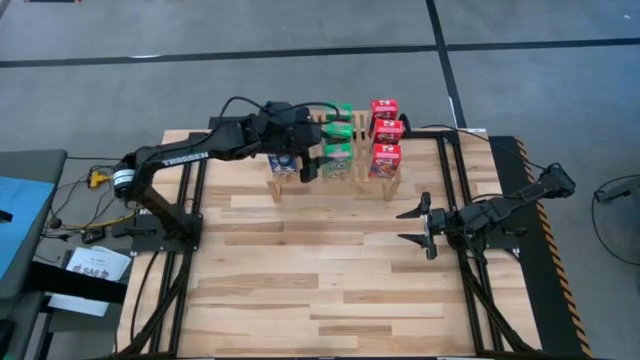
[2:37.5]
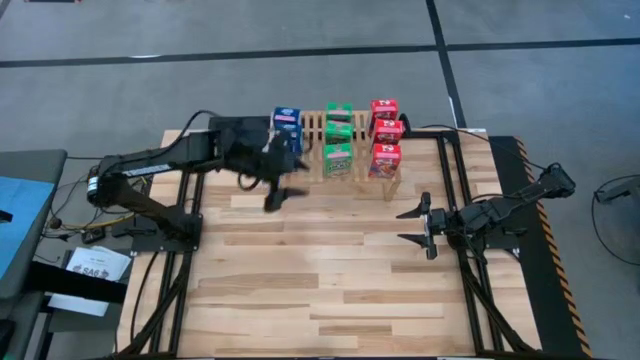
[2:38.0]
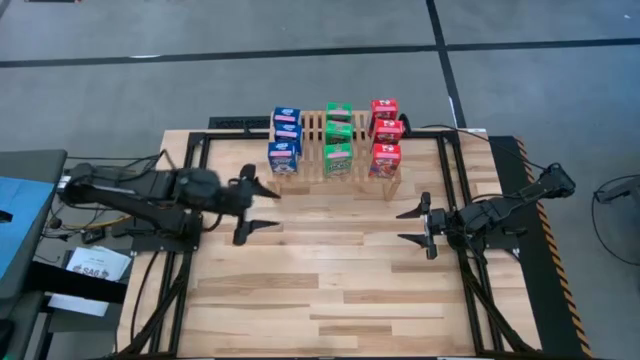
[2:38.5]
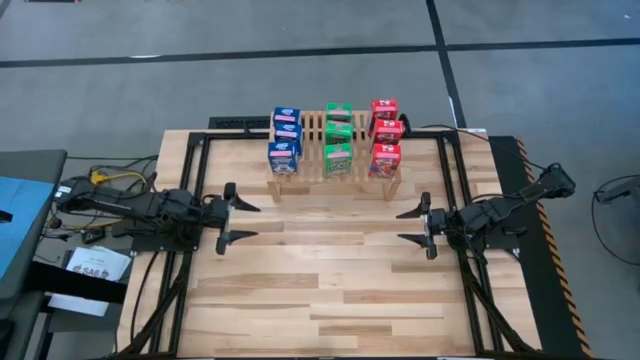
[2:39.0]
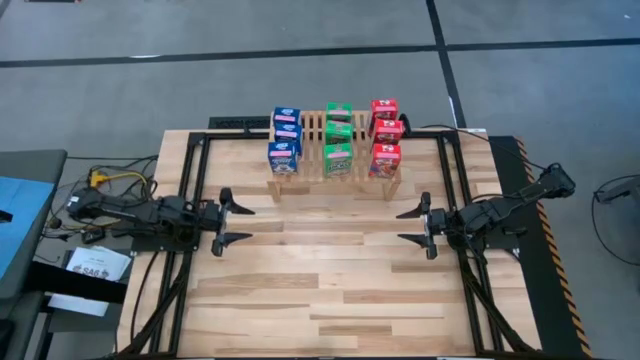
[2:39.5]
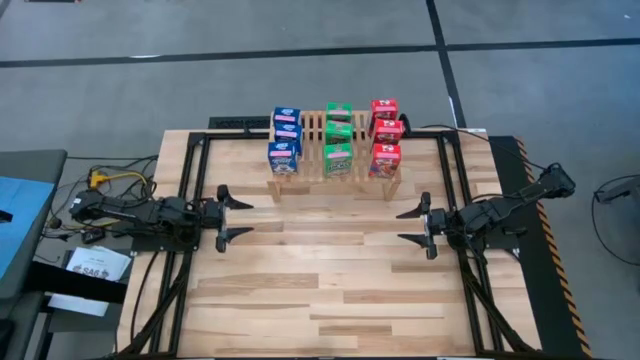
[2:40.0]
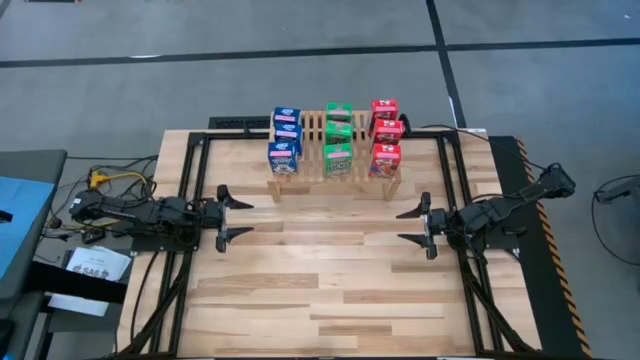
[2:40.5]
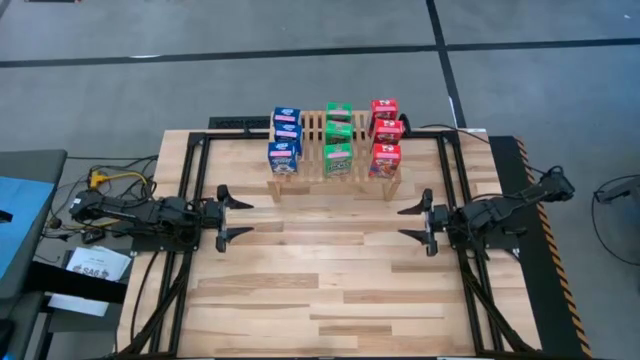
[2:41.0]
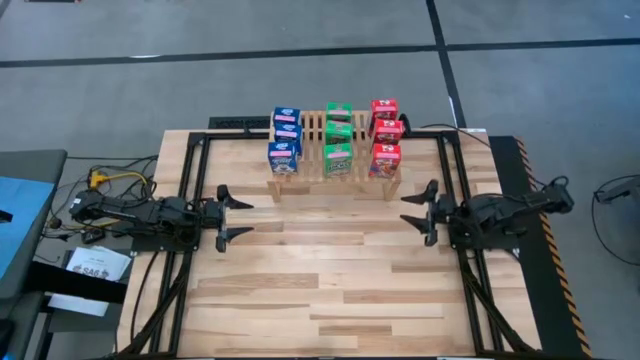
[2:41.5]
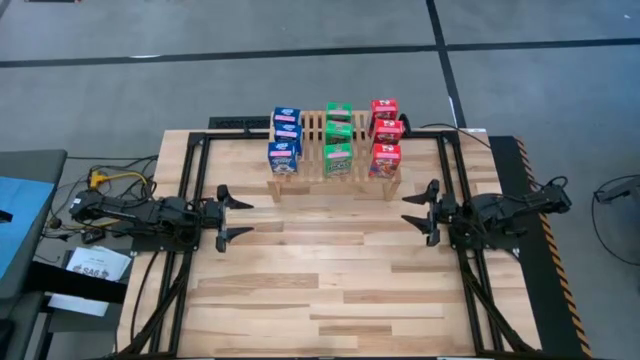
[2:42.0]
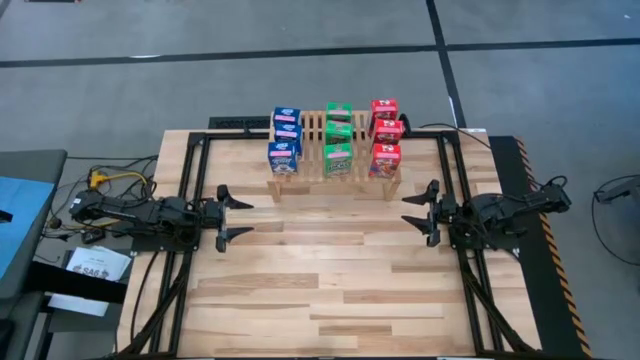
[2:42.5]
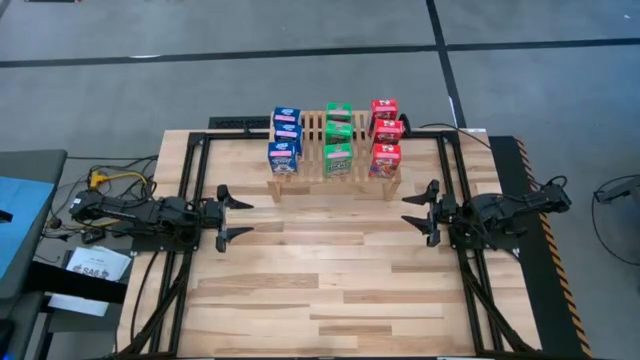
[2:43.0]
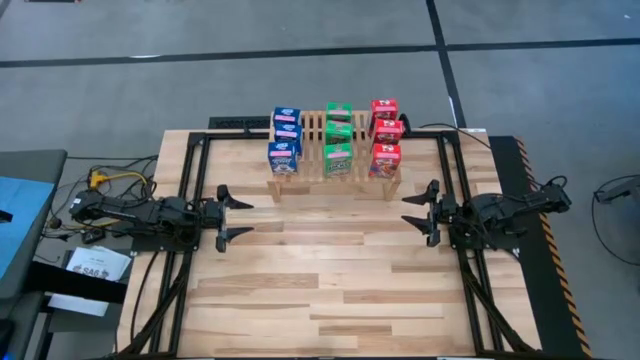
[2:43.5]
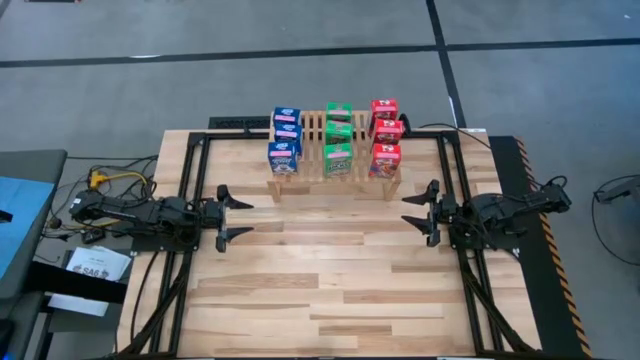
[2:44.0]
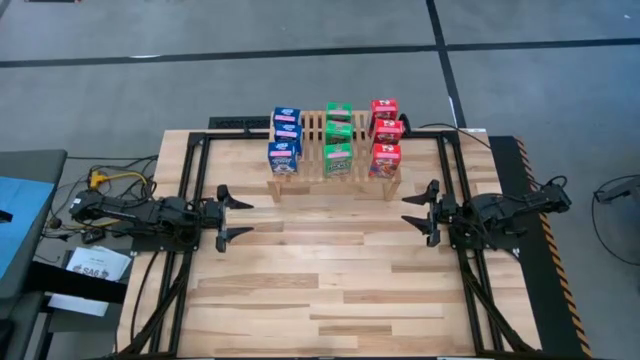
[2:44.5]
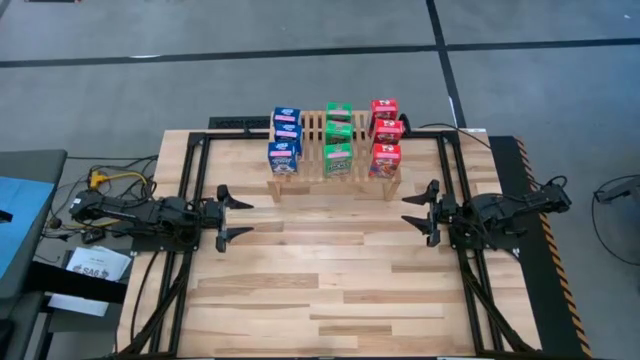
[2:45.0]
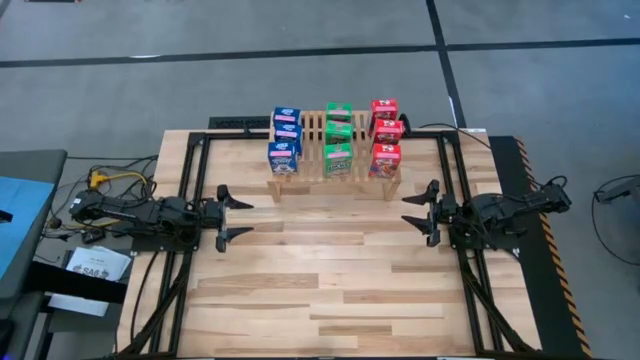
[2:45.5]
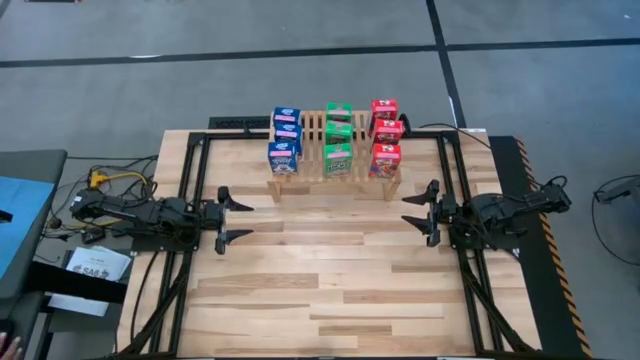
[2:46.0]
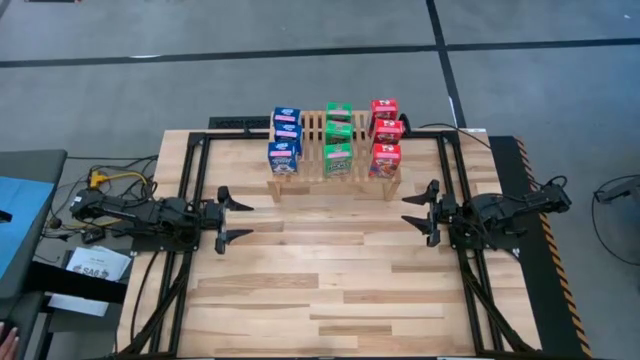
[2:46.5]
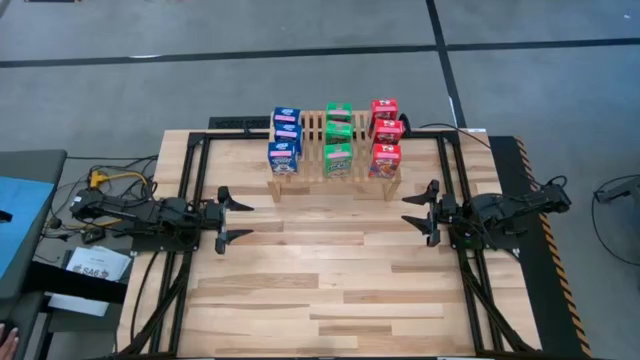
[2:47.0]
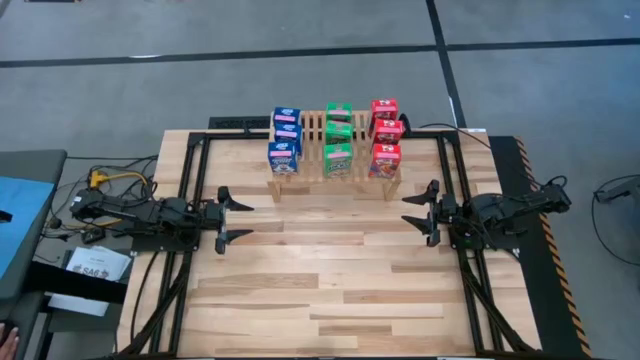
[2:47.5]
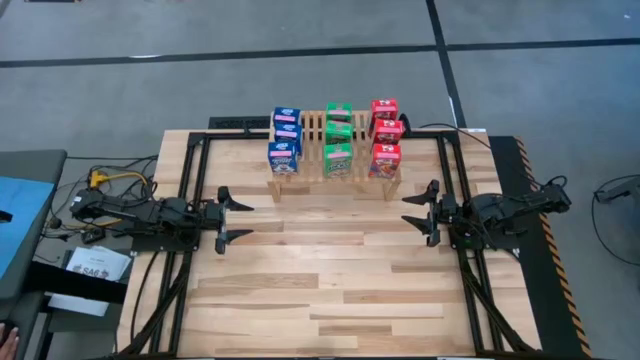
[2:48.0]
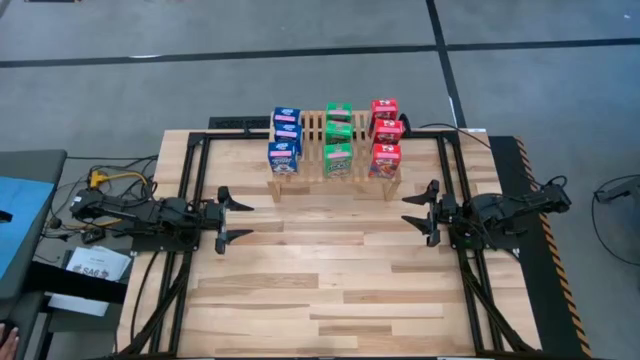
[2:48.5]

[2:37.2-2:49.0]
Task: Stack cereal on shelf
Return to Home Position

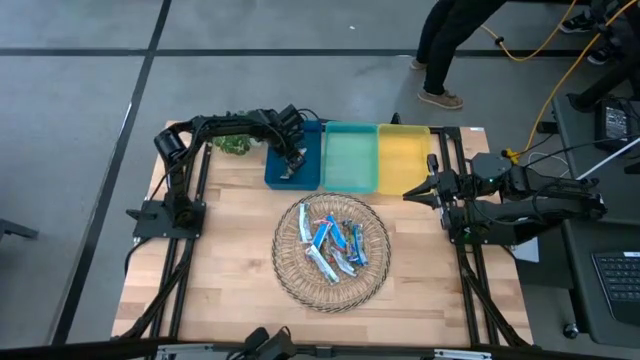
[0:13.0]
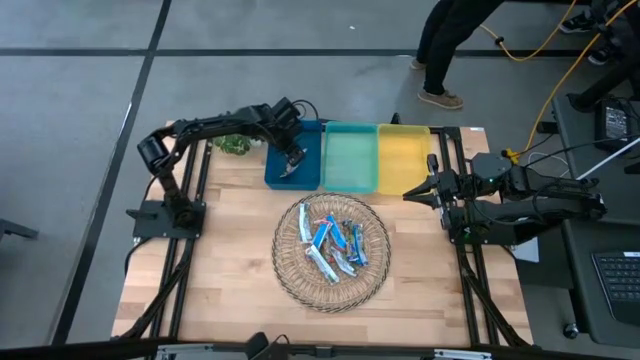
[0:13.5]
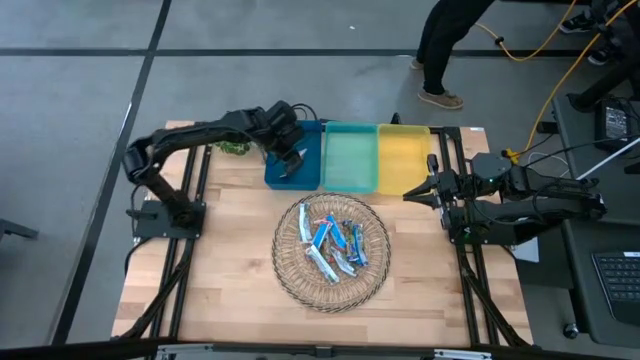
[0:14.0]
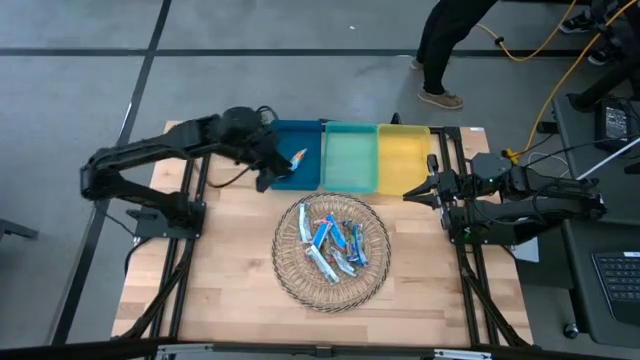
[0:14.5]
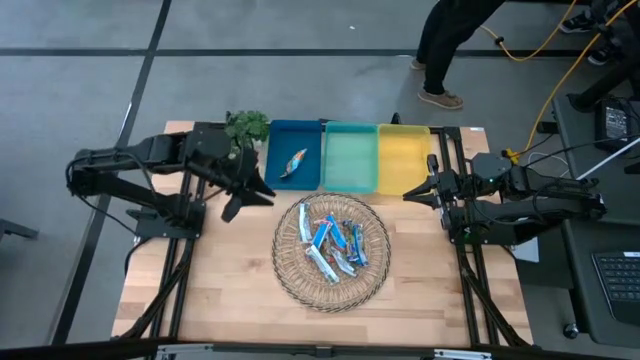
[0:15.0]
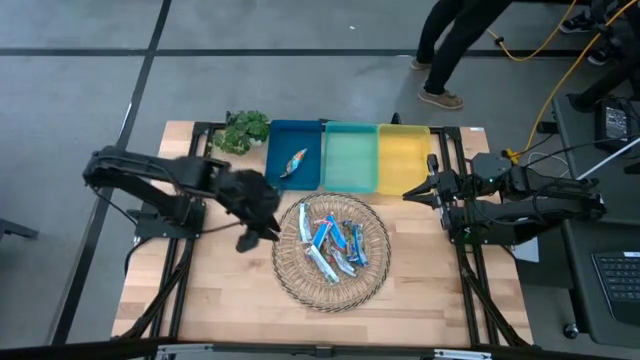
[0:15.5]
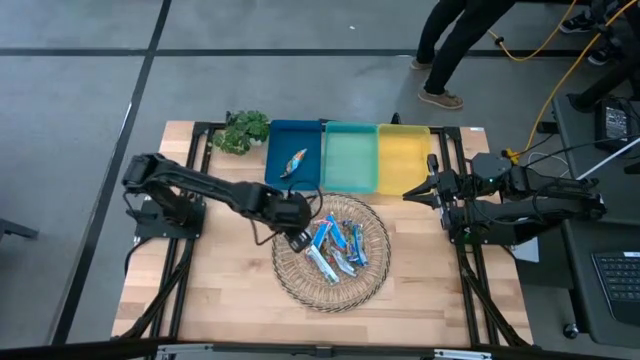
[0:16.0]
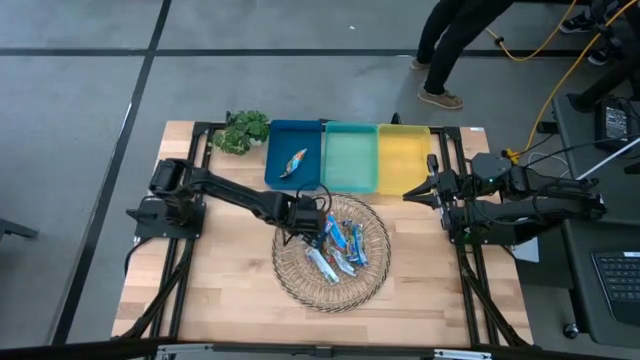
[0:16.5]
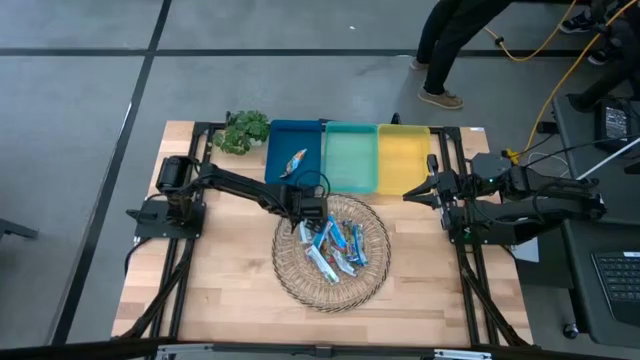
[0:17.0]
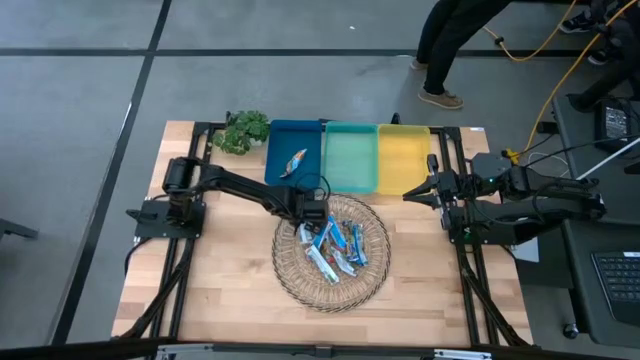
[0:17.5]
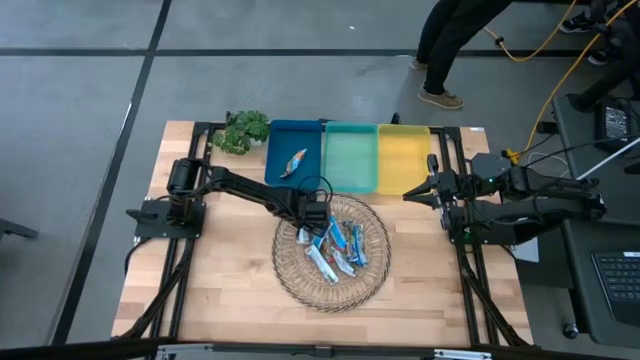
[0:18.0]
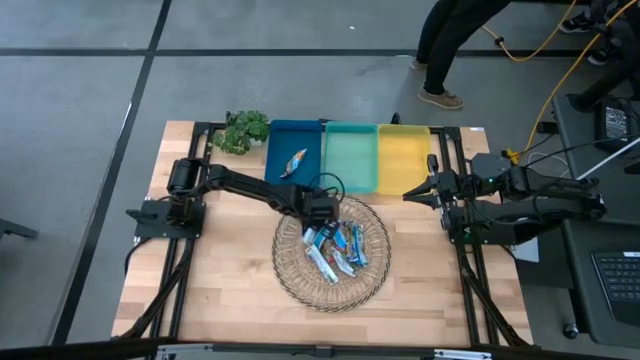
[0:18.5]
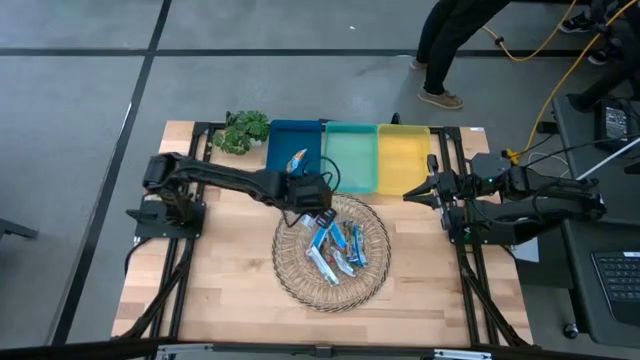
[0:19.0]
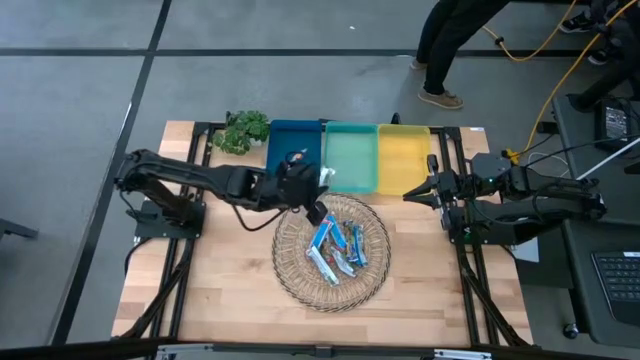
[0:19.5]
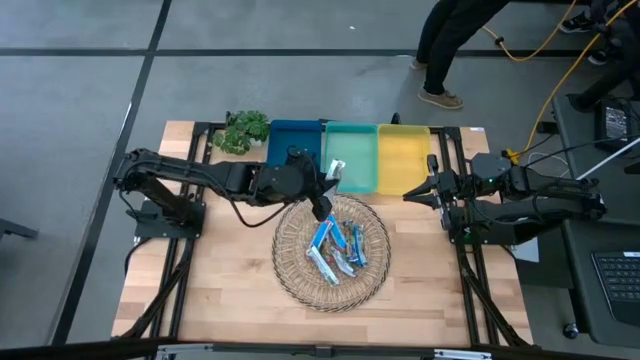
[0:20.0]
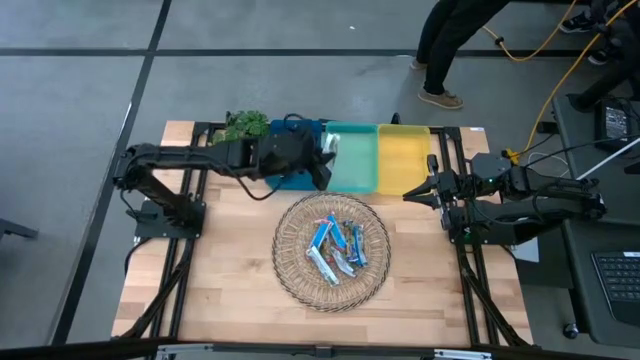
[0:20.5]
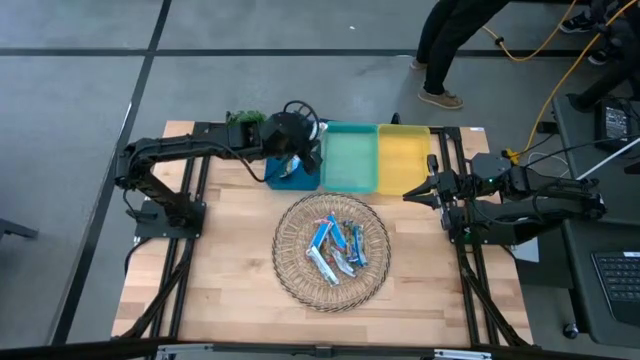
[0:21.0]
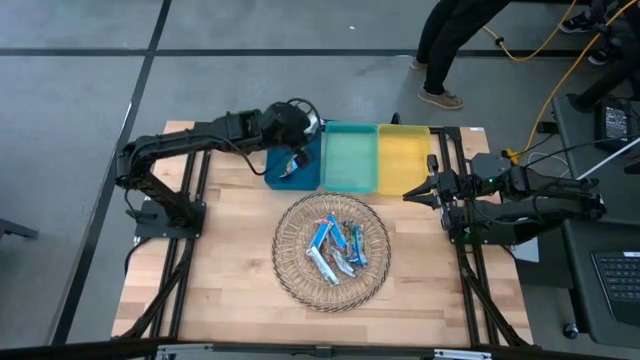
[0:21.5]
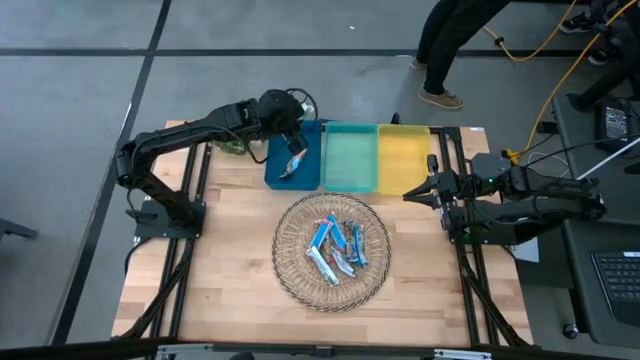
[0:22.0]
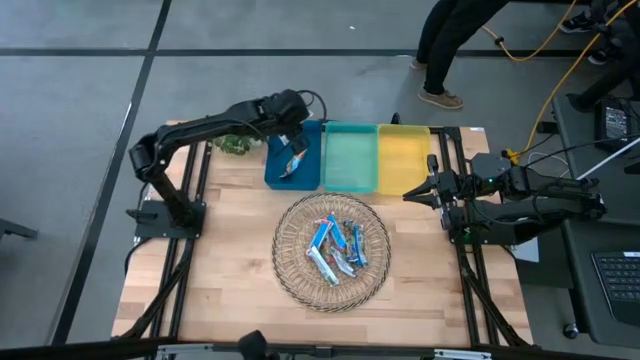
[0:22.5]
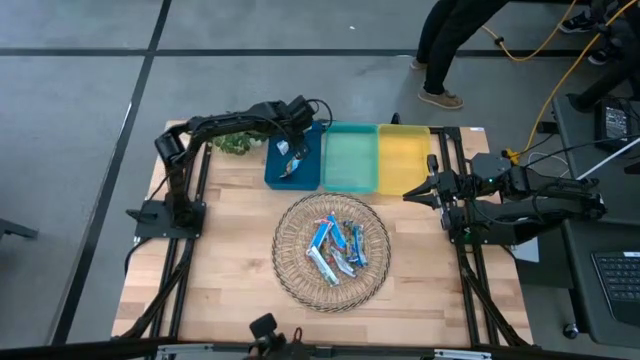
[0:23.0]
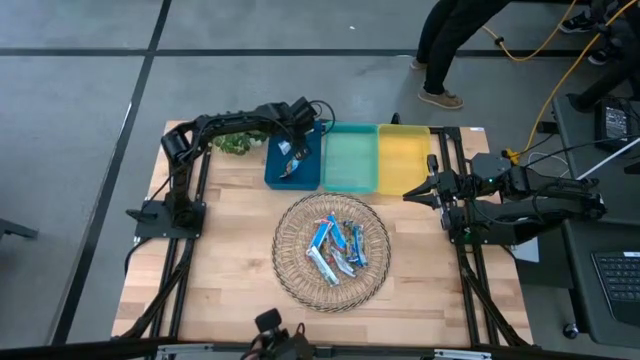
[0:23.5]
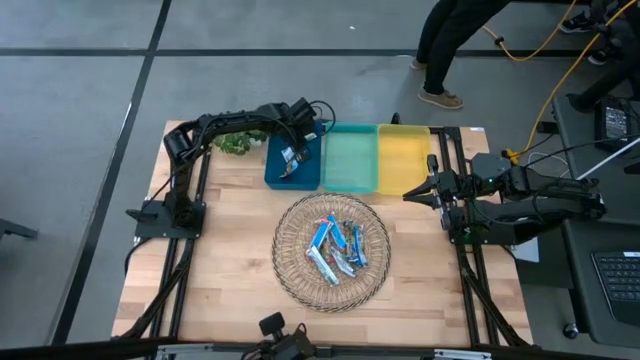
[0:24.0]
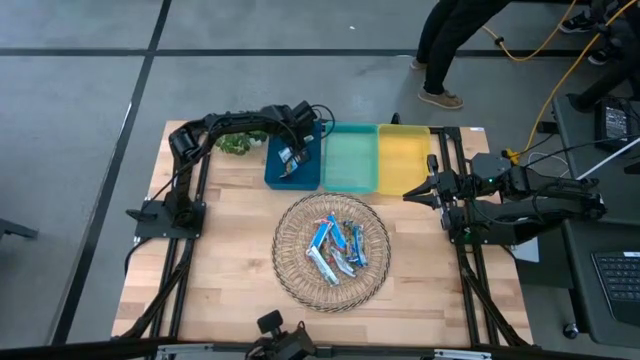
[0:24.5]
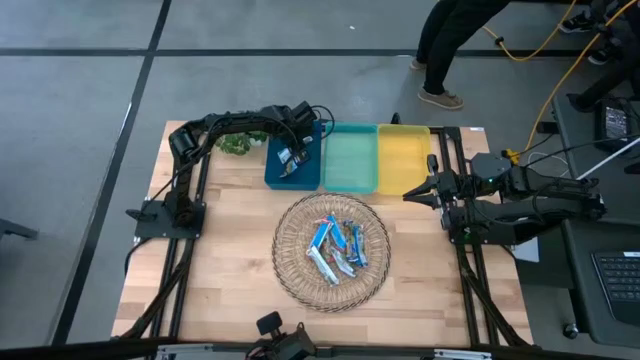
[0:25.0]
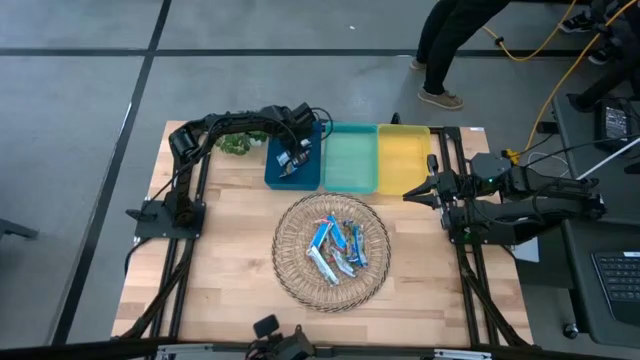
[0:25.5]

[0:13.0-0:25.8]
Task: Pick and place Granola Bars by type
Put the yellow granola bar into the blue bin
